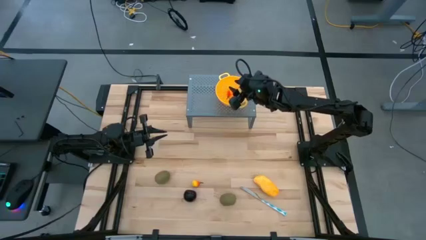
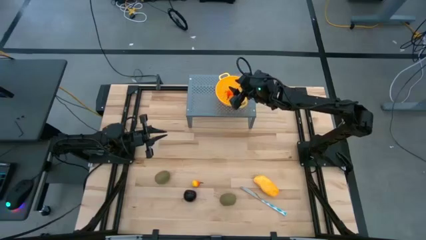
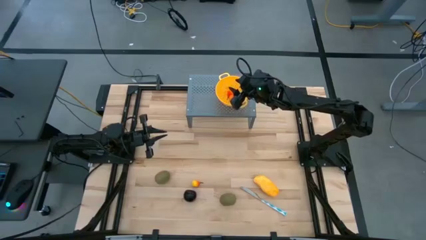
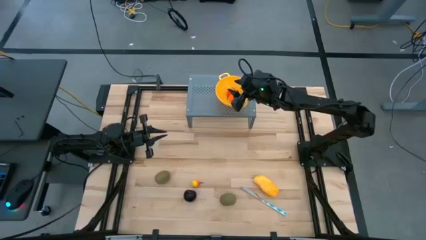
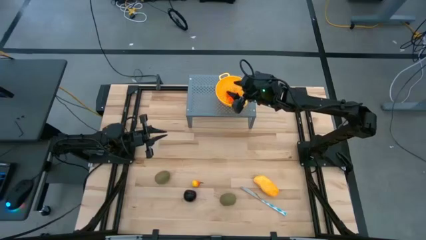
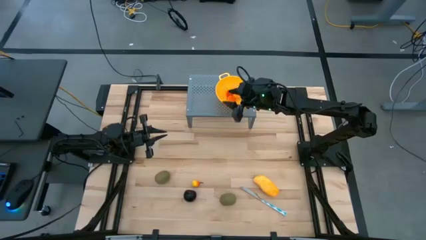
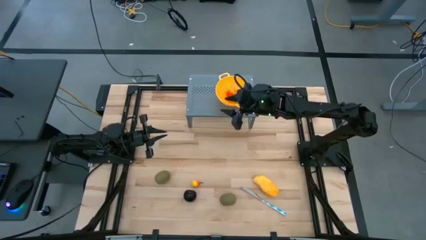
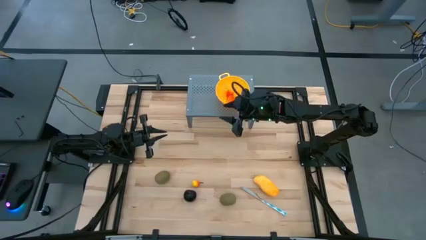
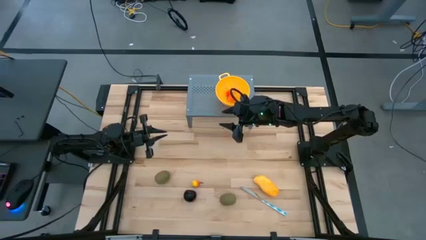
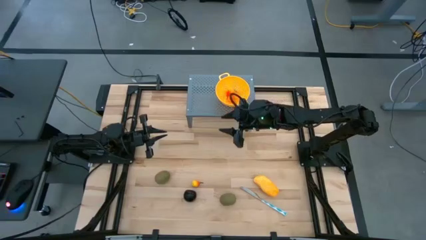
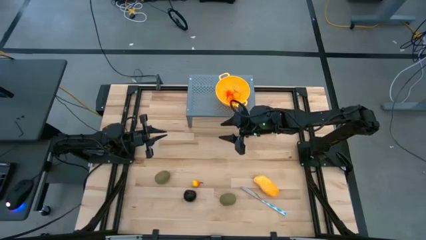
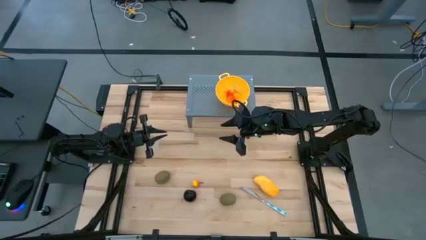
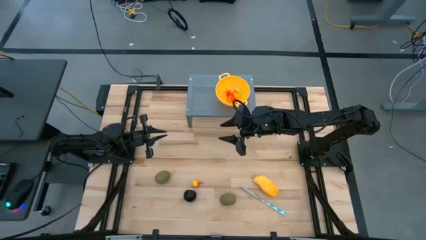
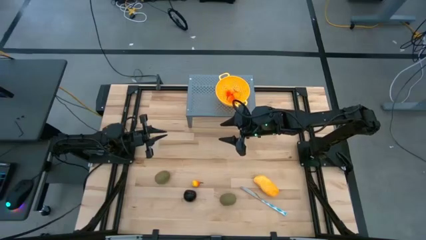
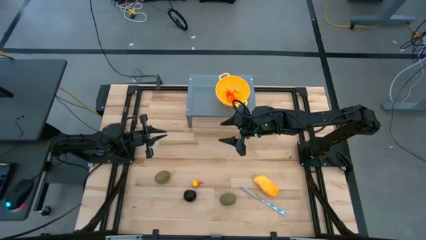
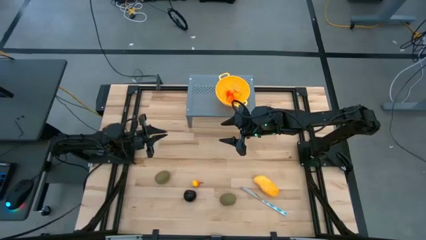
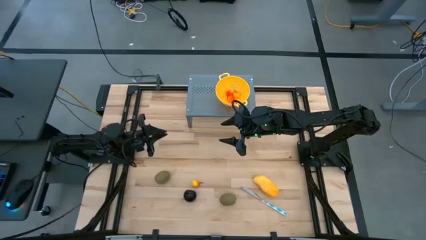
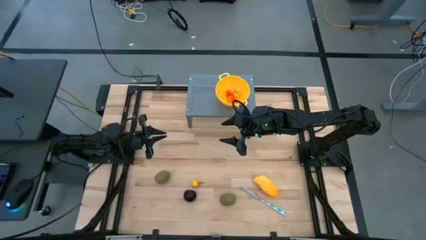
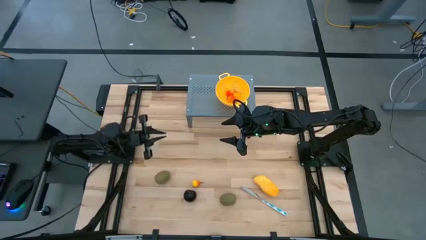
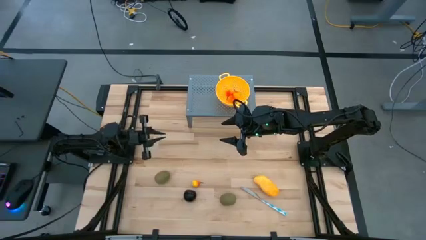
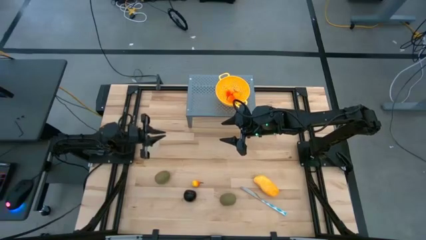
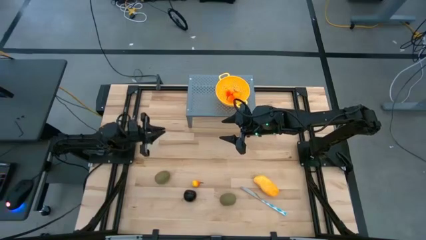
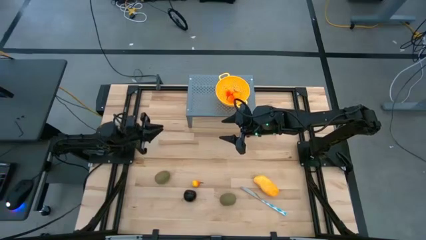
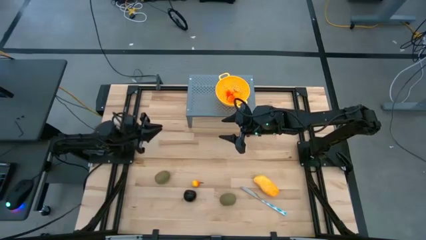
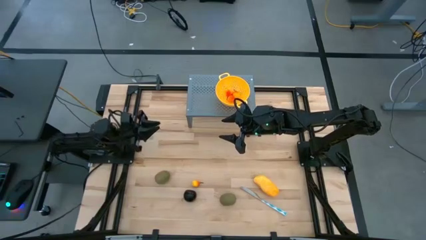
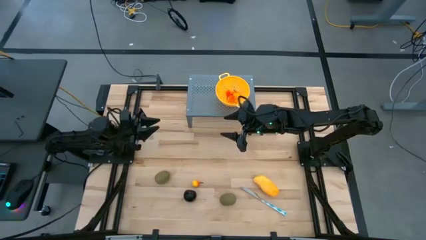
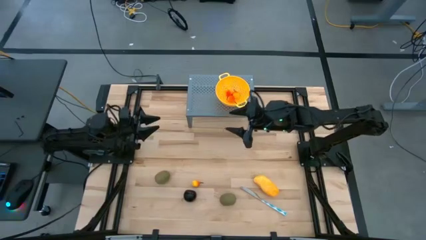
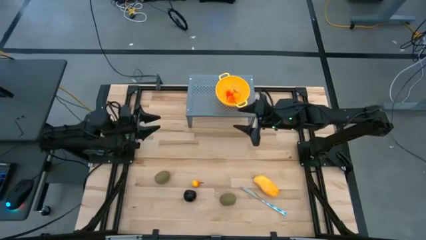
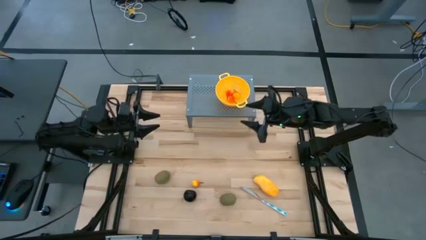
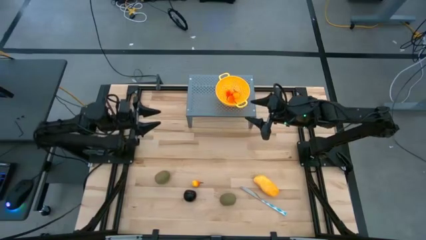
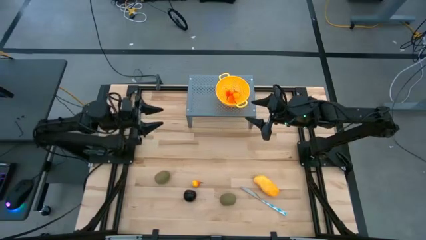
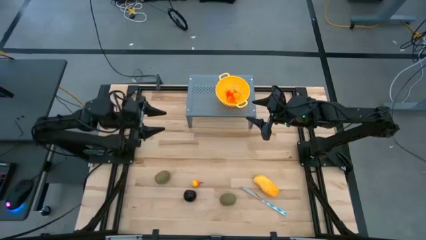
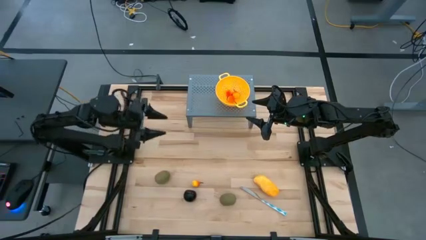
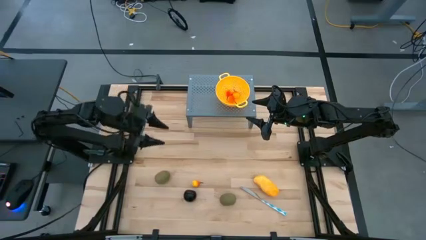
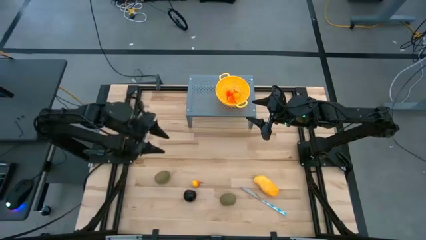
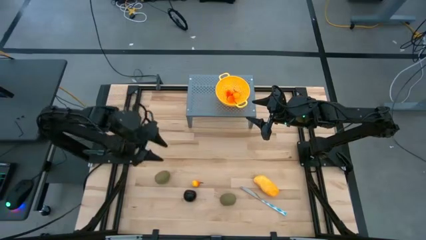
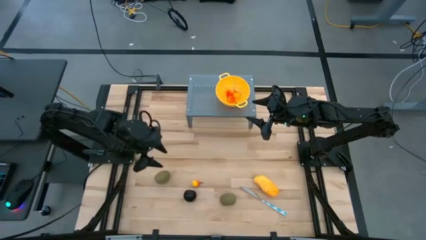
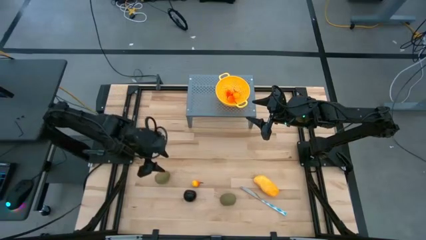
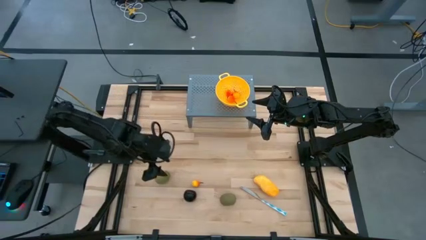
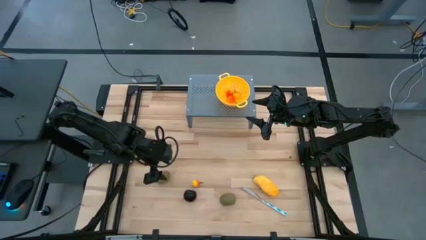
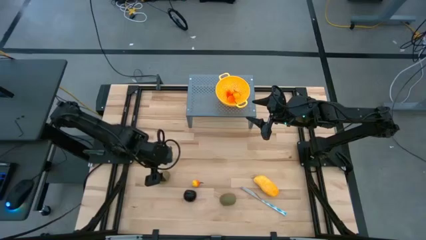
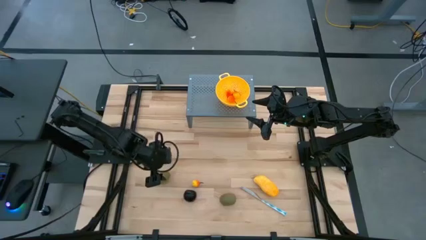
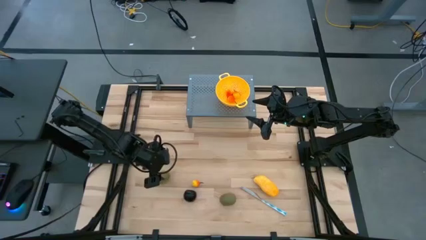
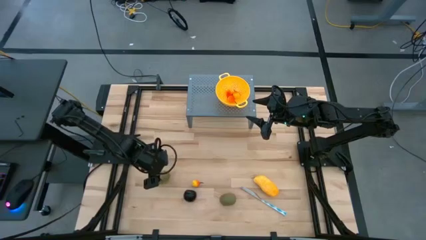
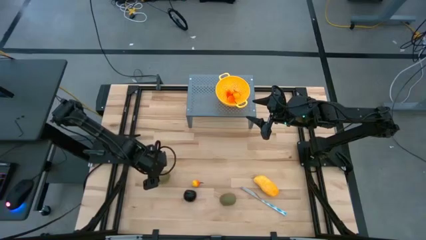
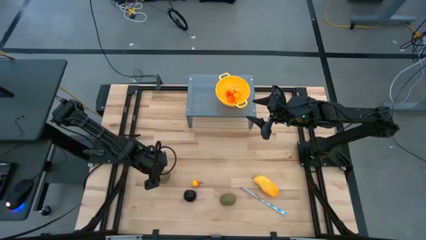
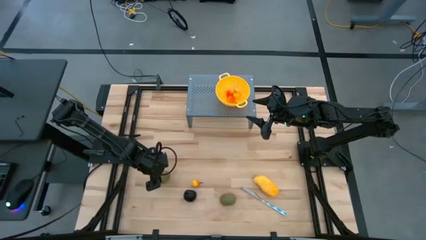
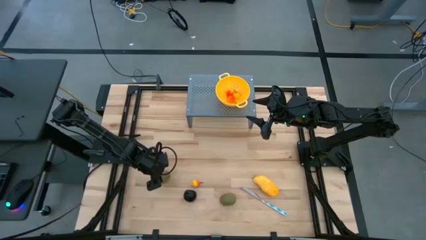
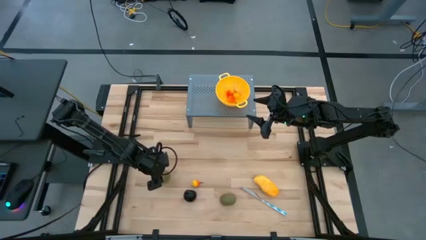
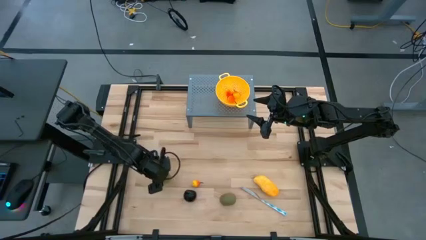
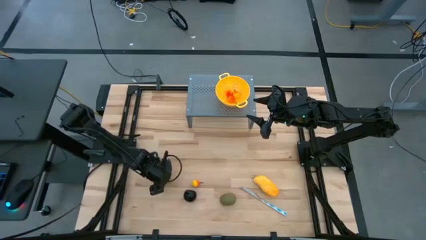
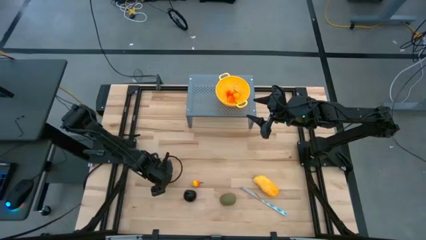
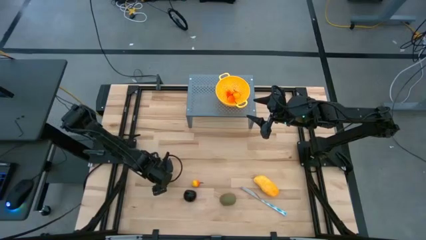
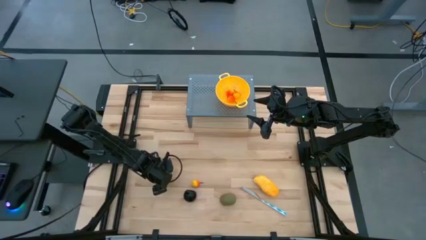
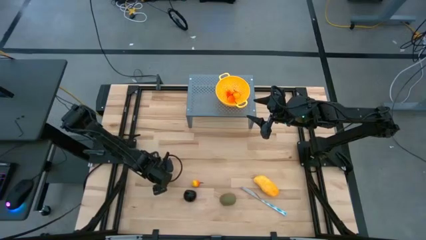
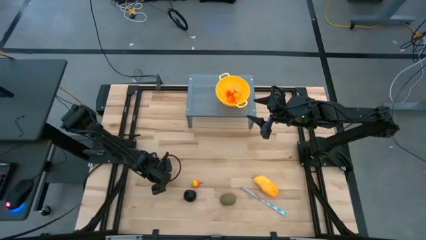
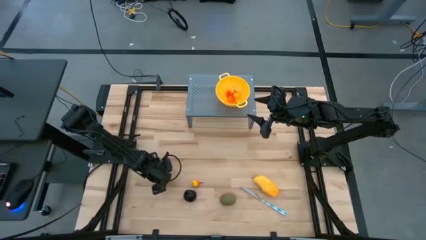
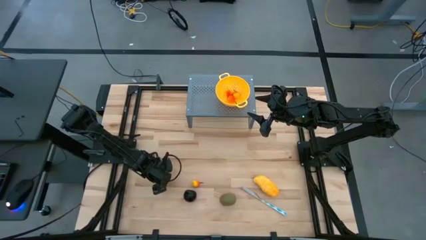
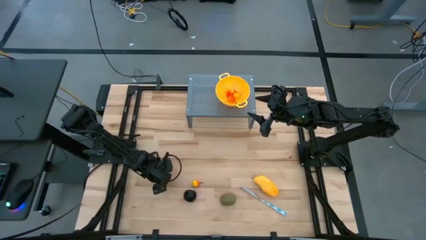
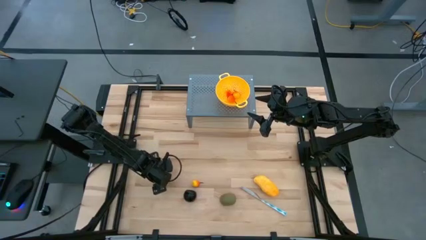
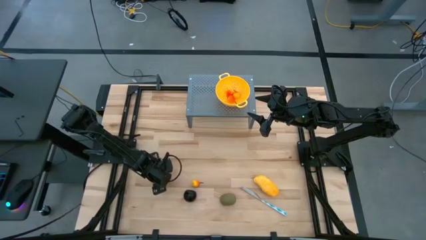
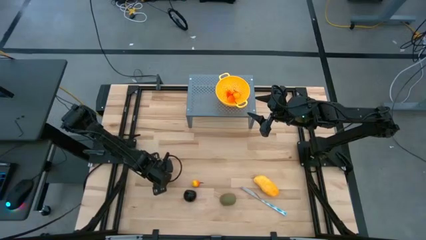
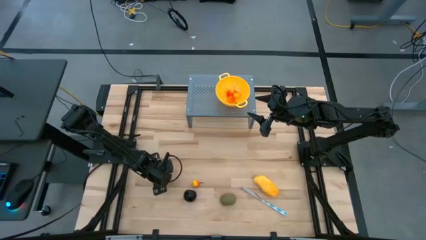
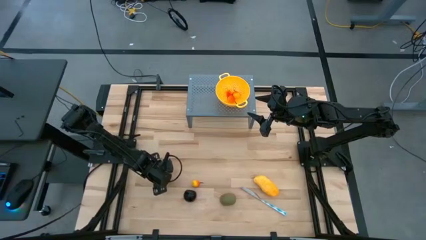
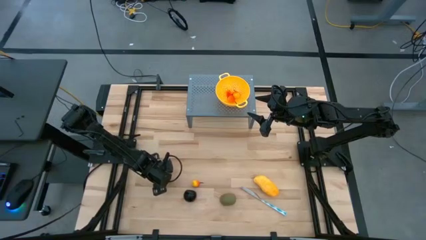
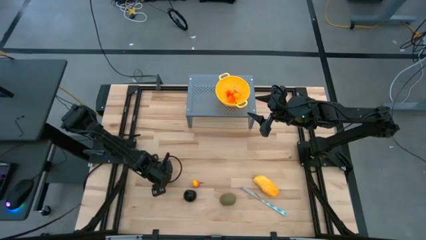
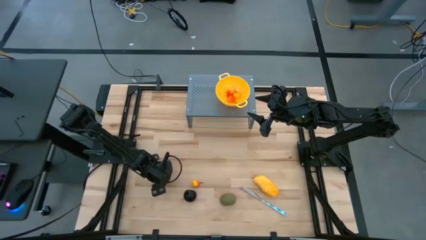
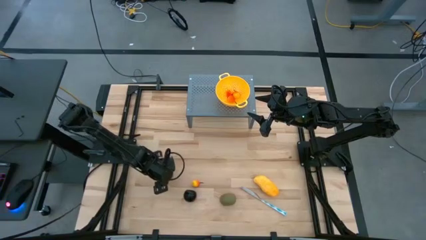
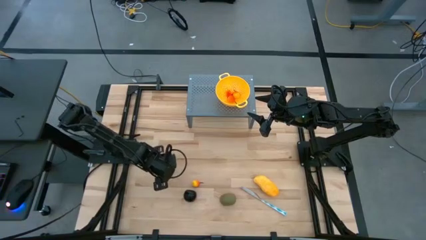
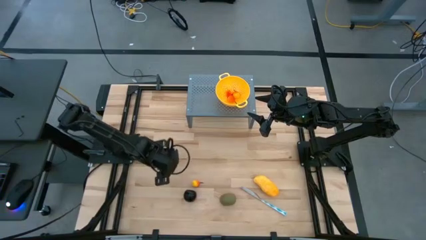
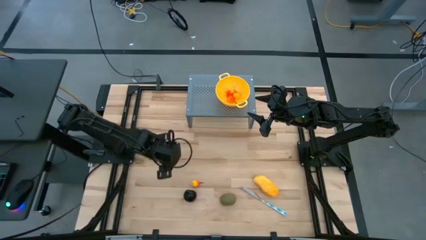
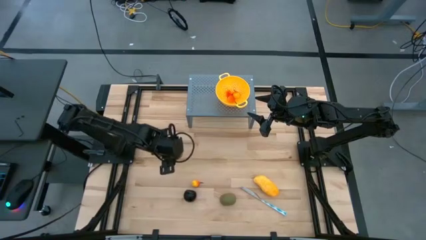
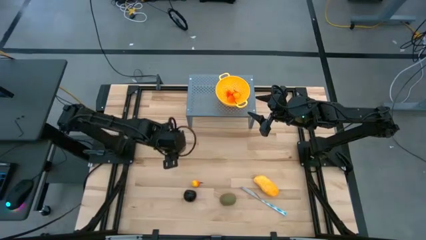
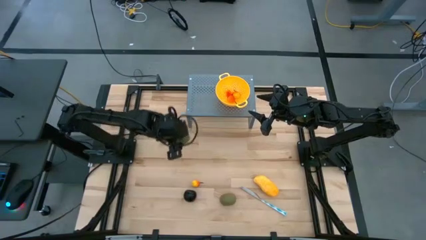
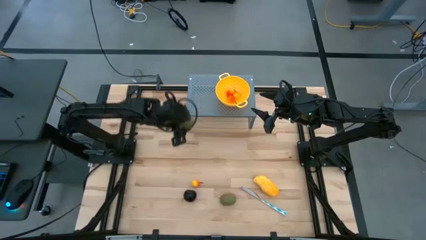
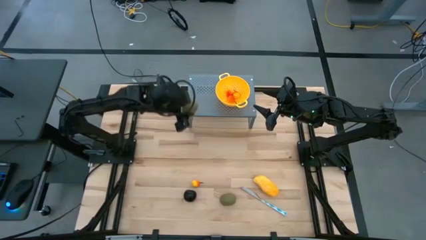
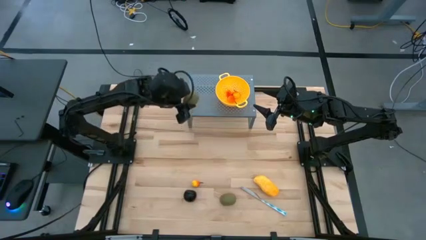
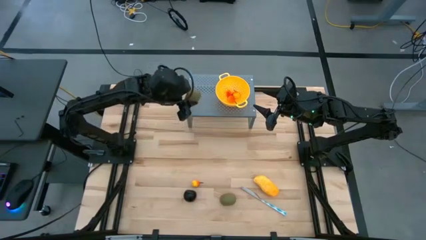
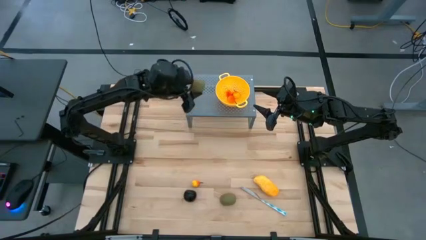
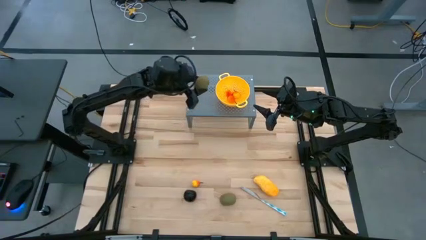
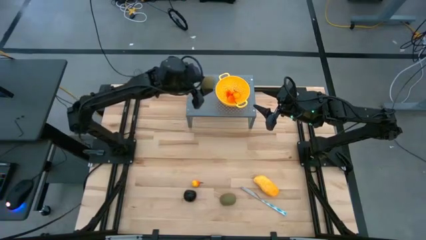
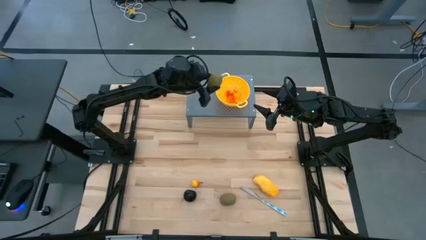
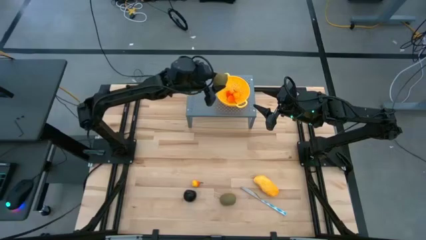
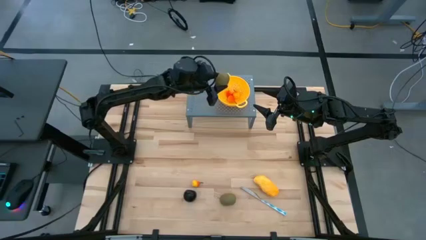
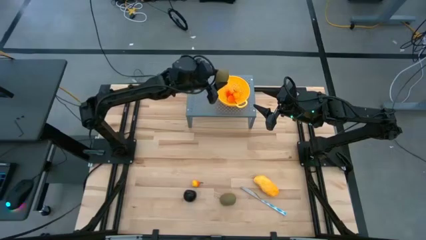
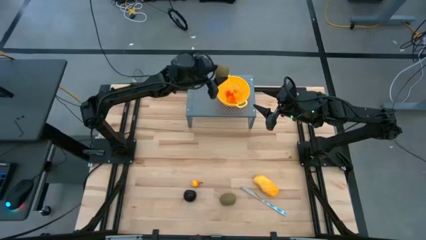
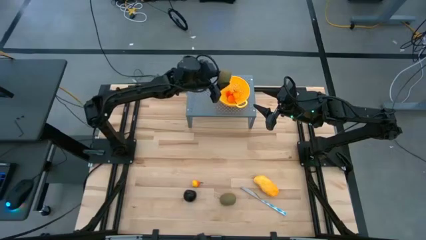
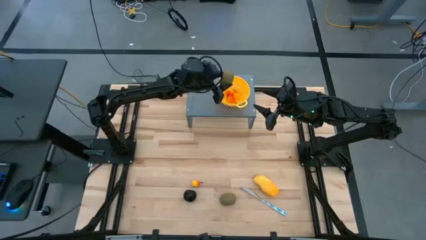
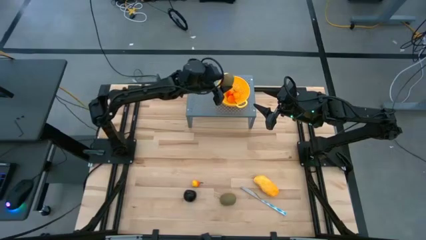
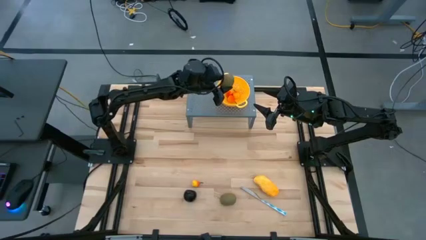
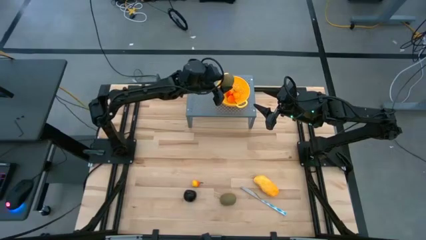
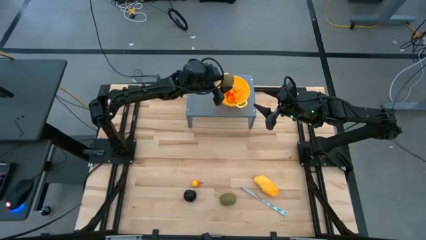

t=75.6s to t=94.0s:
Task: Pick & Place Fruit
Put the kiwi into the yellow strainer bowl on the shelf
